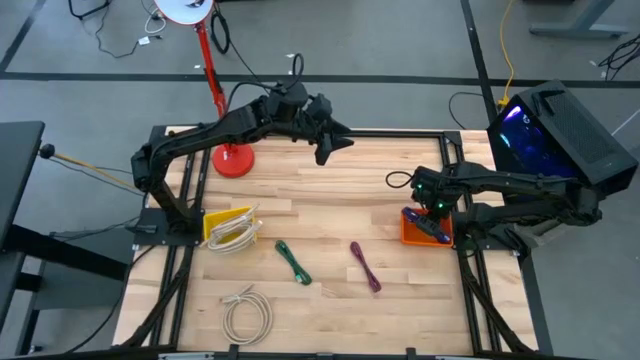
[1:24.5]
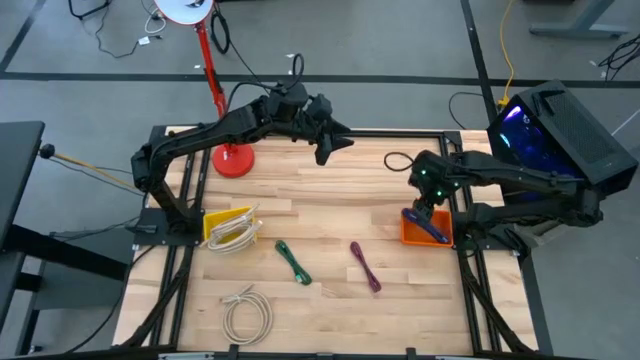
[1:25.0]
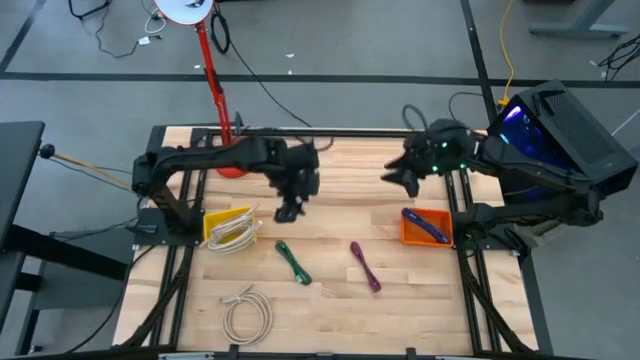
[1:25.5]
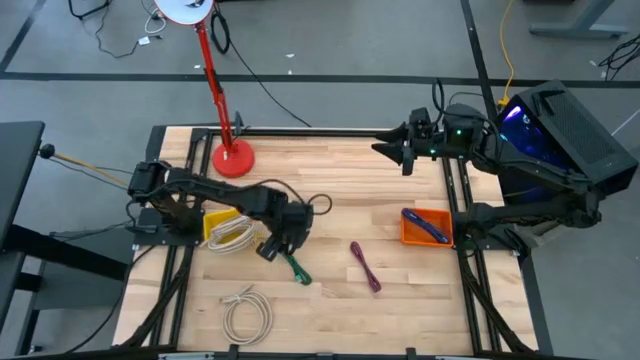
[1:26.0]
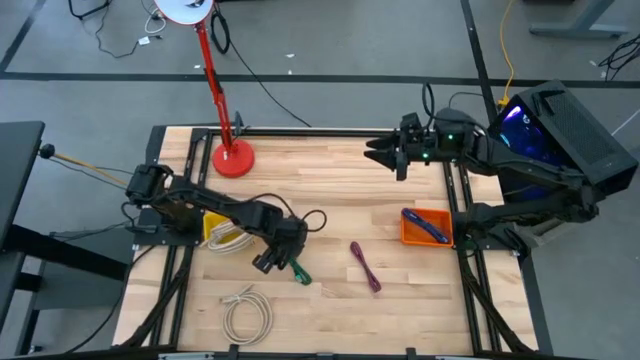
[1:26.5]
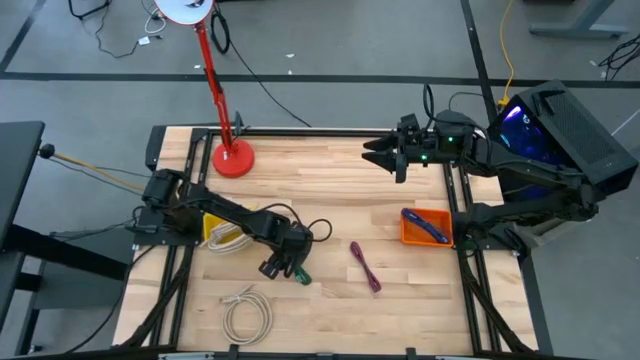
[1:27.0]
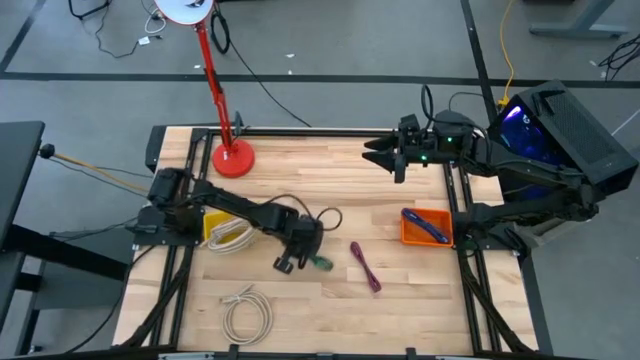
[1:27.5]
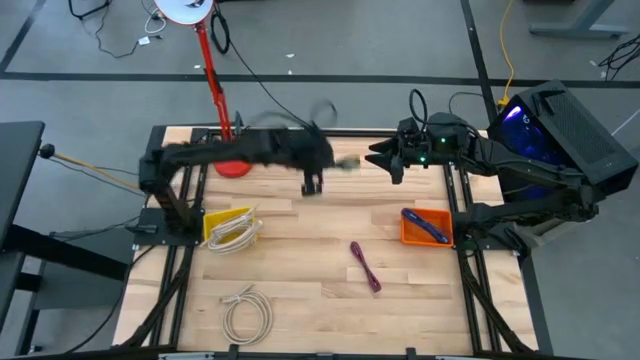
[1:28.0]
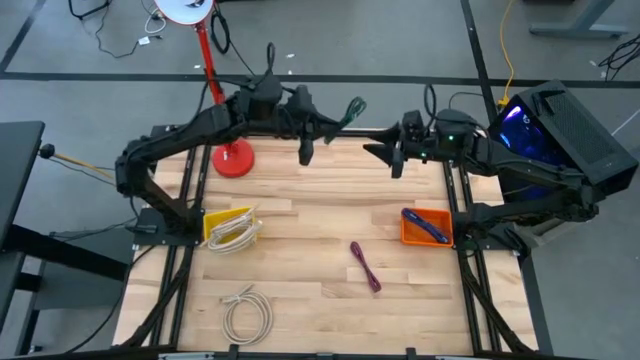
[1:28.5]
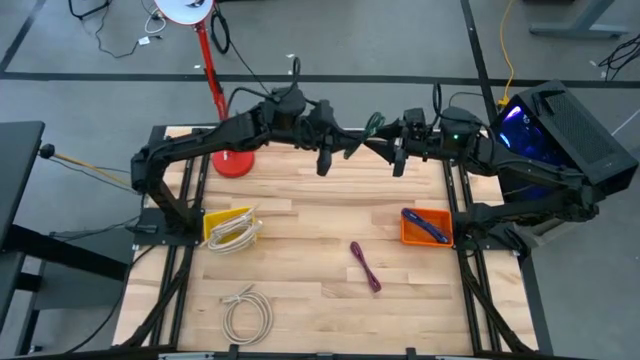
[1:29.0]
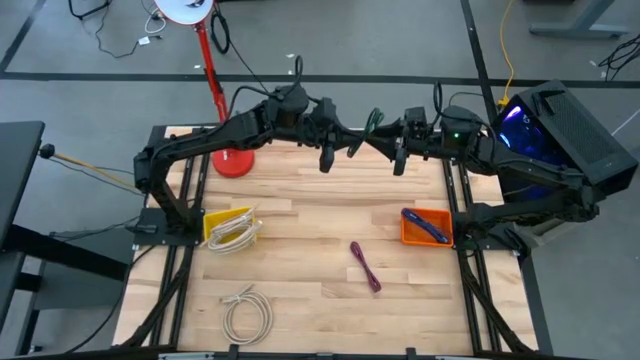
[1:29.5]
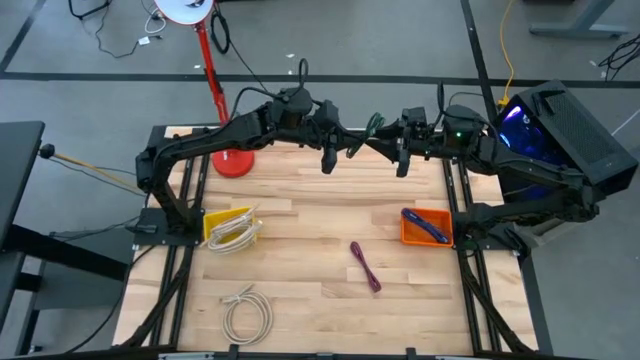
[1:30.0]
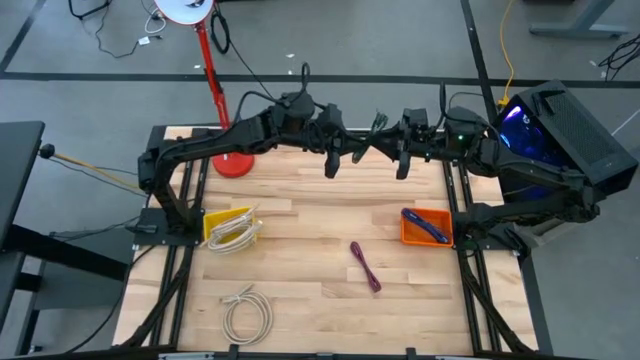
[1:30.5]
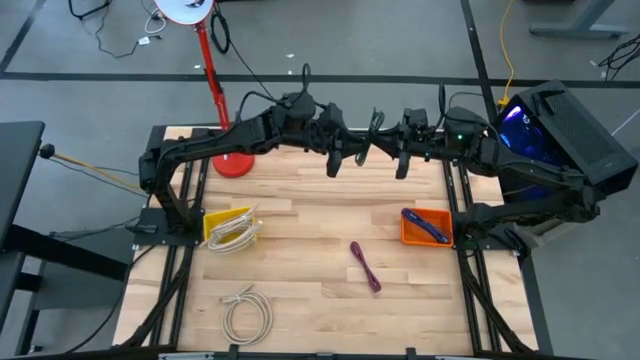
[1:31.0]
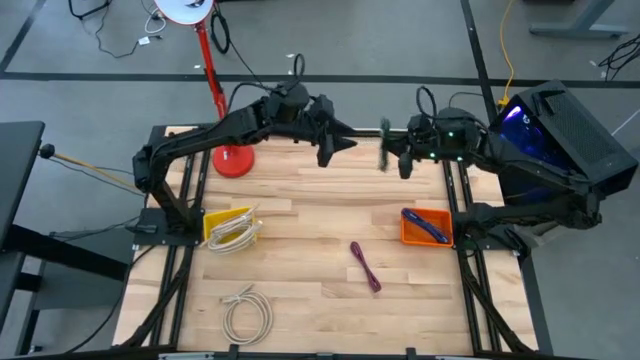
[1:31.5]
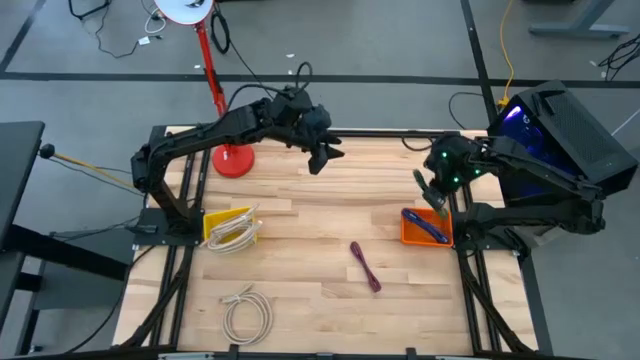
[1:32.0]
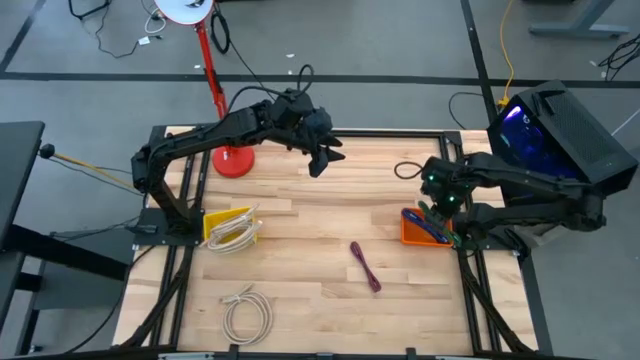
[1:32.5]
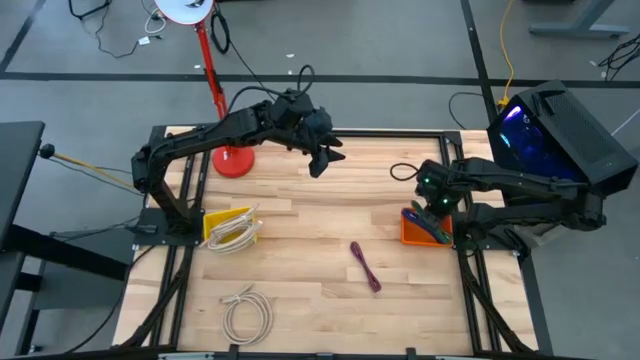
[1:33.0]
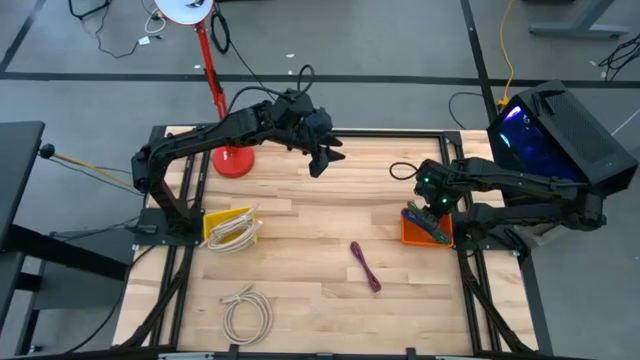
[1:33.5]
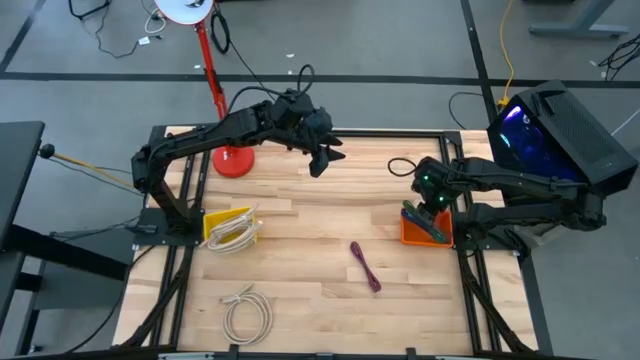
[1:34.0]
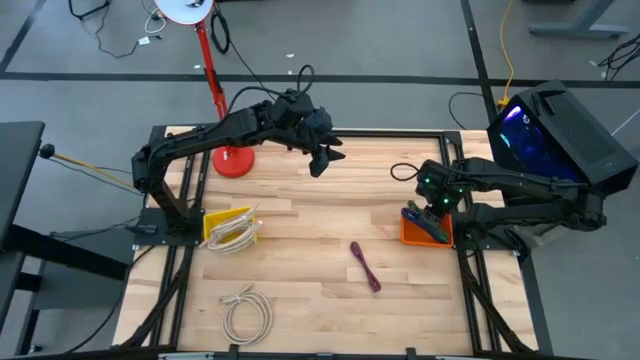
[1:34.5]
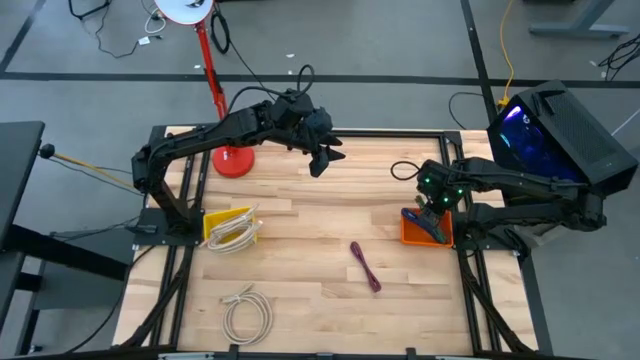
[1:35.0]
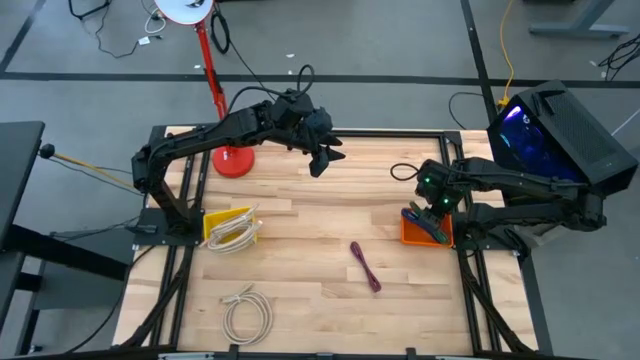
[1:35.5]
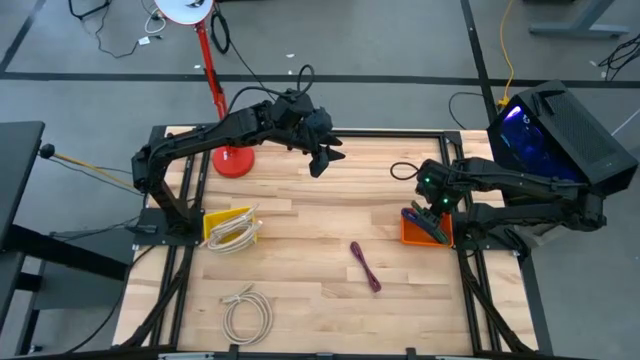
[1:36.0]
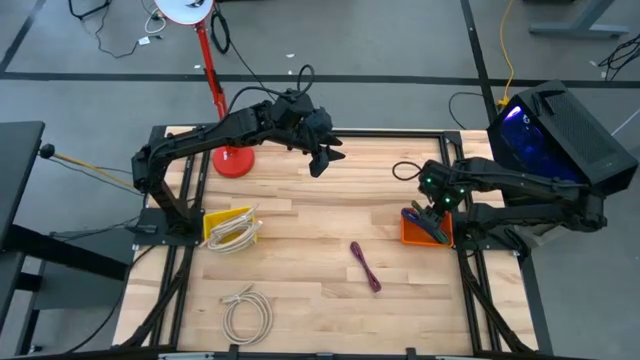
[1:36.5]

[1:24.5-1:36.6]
Task: Pick & Place USB Port
Put the green USB cable into the orange bin

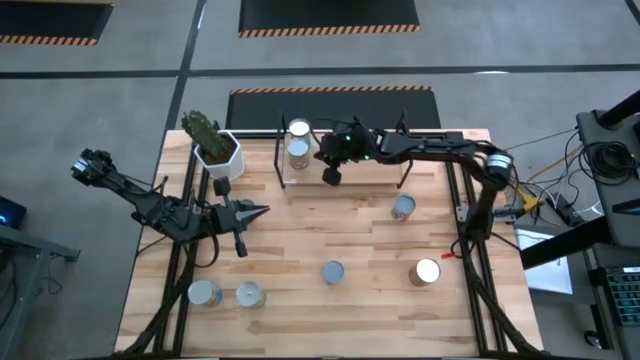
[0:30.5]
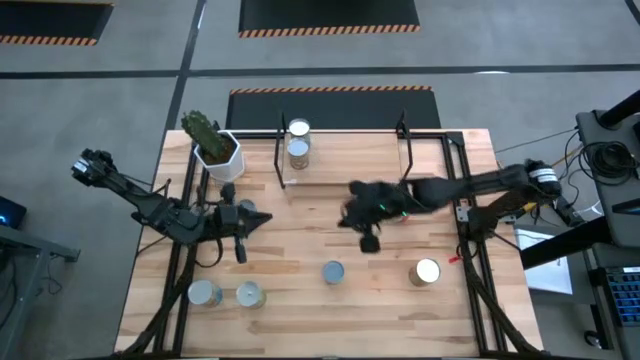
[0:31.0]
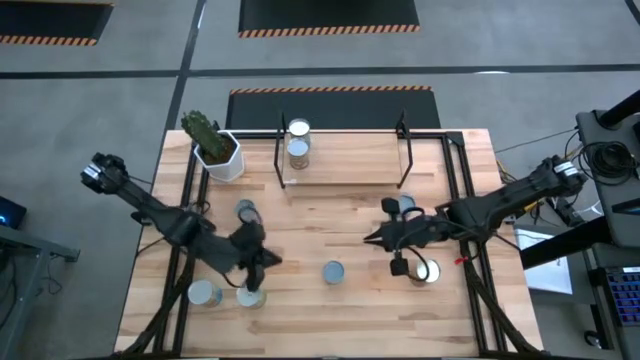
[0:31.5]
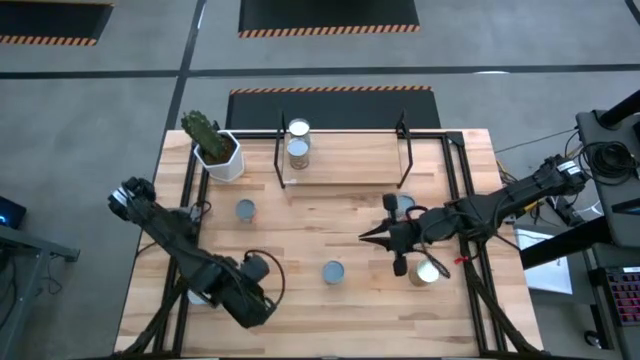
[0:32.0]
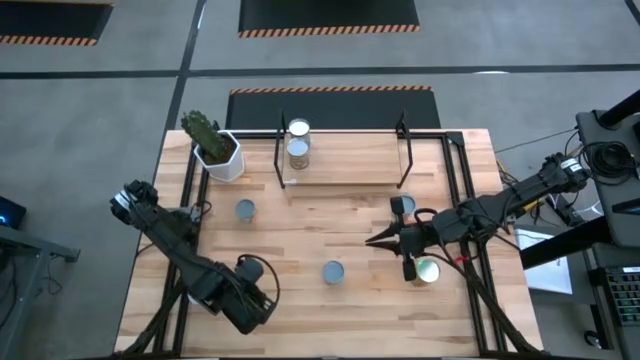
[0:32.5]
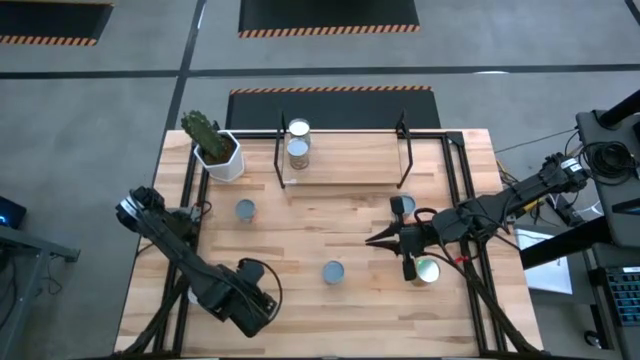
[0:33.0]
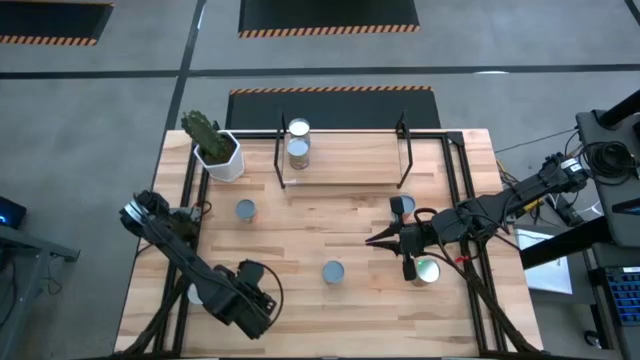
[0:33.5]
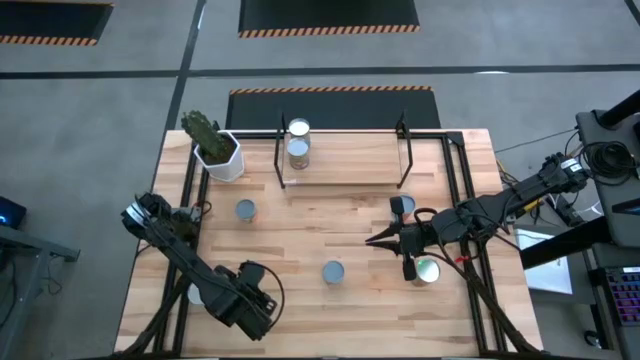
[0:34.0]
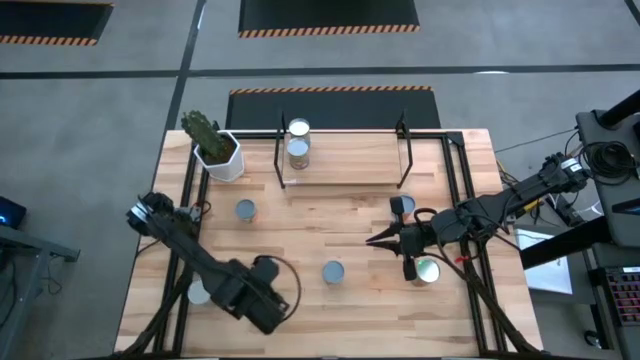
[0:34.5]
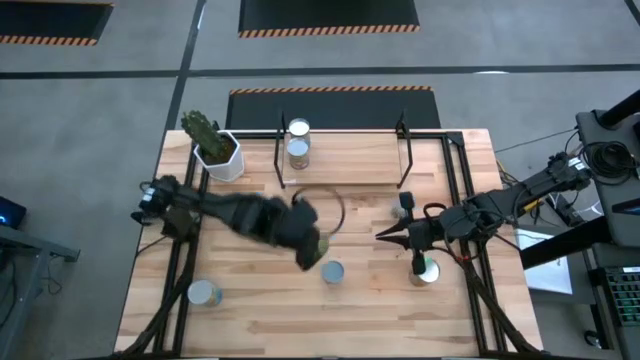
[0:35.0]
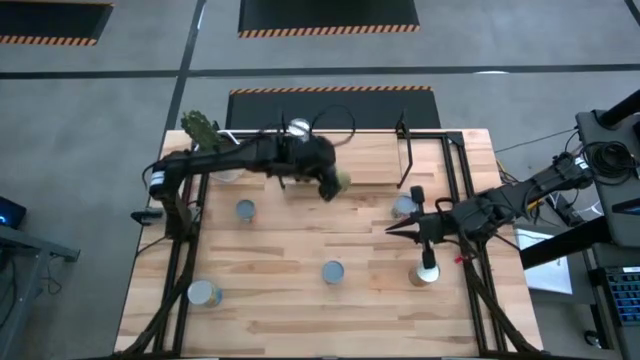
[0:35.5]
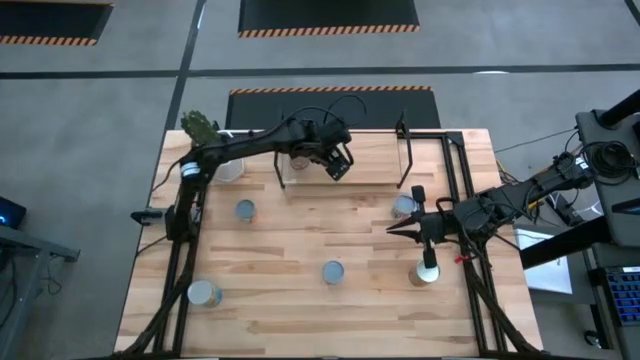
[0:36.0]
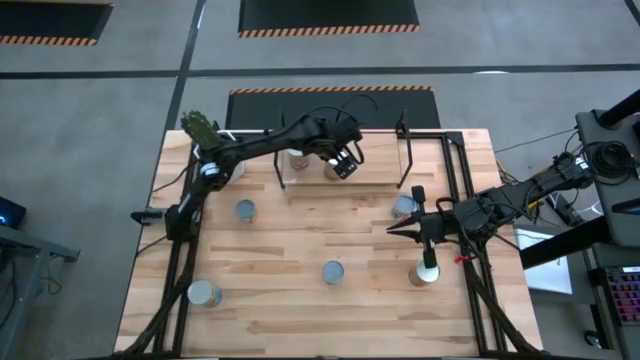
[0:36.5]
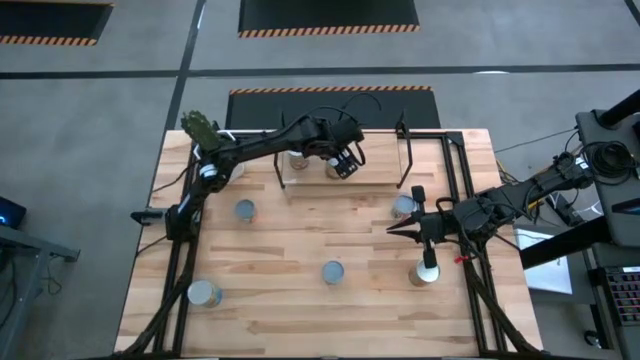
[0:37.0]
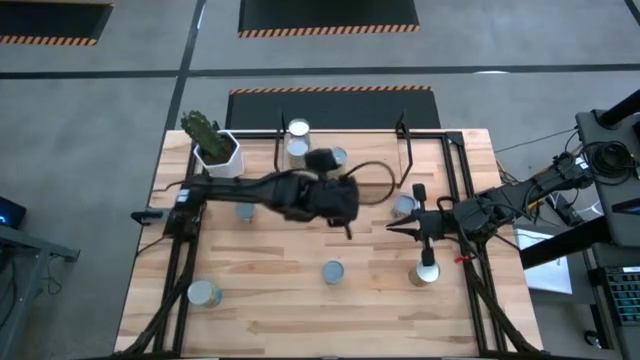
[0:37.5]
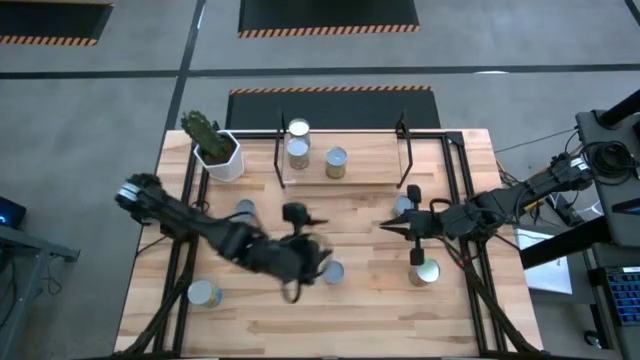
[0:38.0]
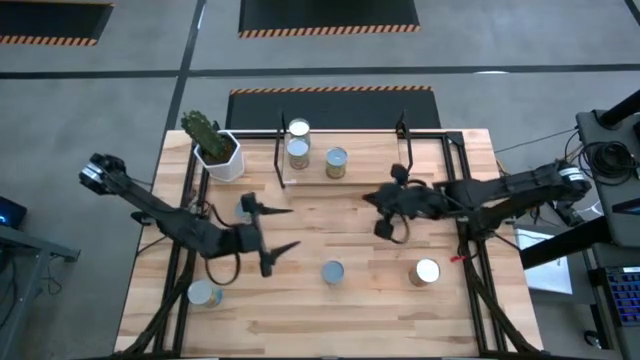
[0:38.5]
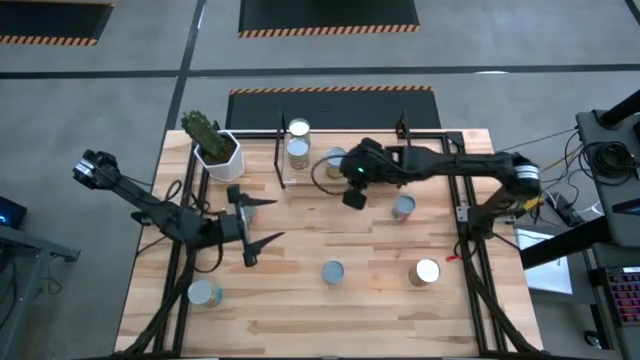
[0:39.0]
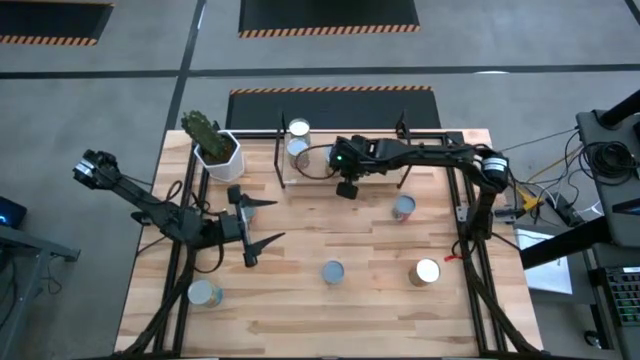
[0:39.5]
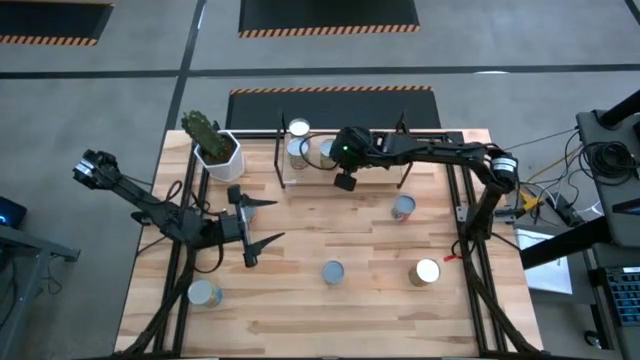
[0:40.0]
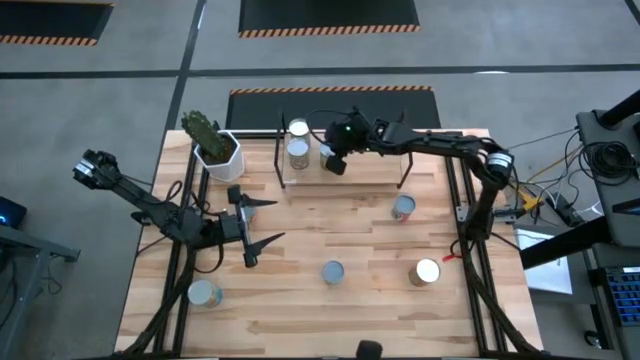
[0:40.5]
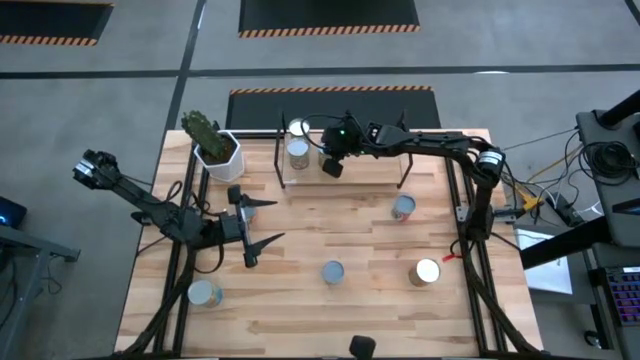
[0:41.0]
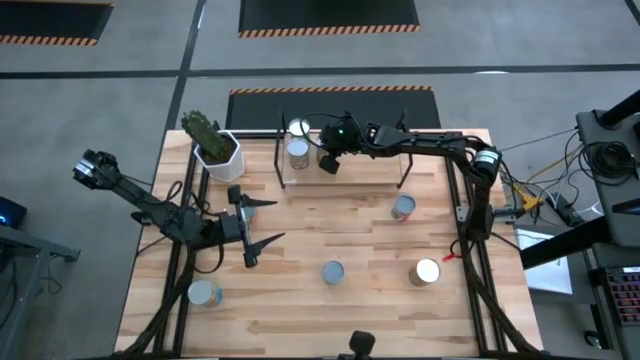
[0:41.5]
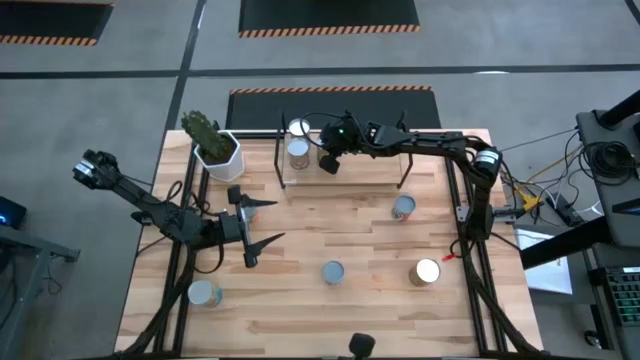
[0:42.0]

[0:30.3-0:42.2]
Task: Pick and place cans onto a shelf
Put the large canned oranges on the shelf
